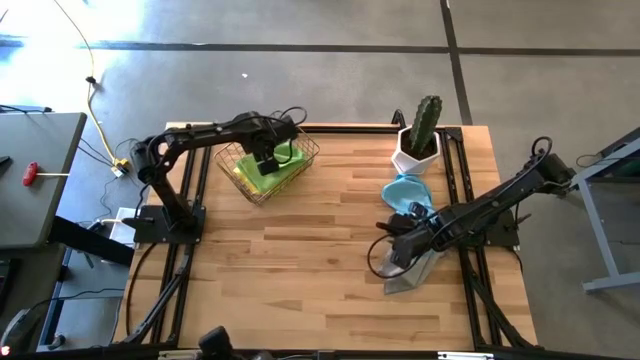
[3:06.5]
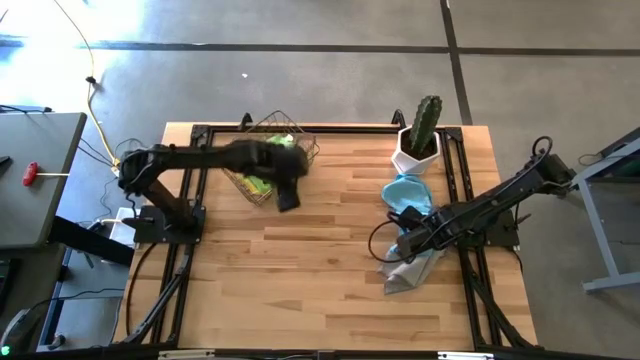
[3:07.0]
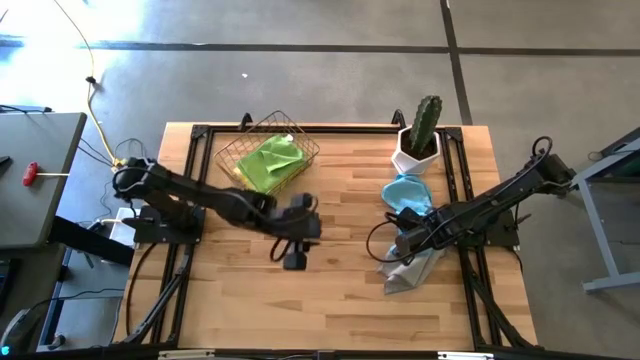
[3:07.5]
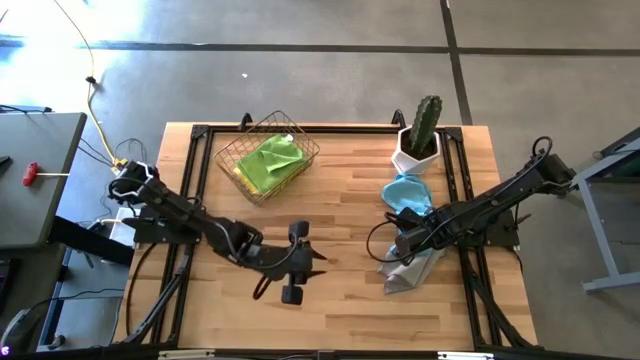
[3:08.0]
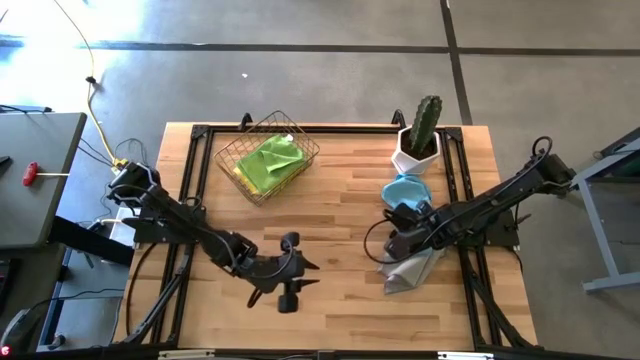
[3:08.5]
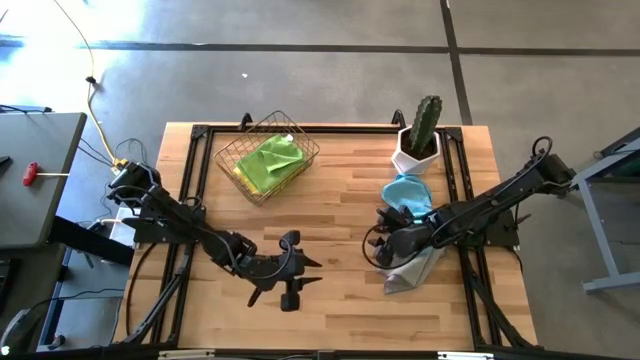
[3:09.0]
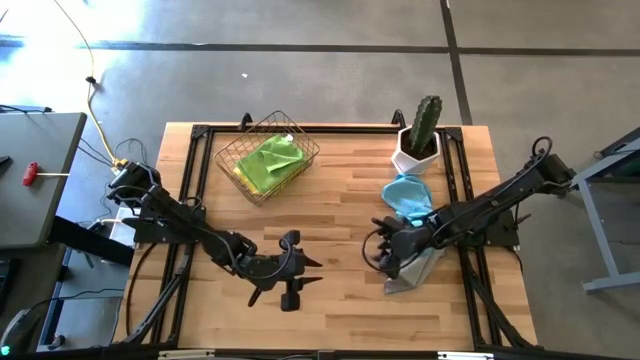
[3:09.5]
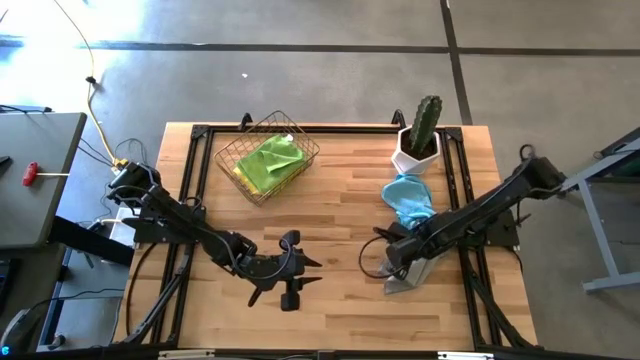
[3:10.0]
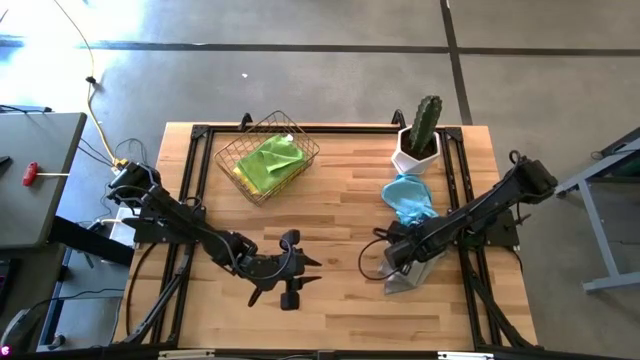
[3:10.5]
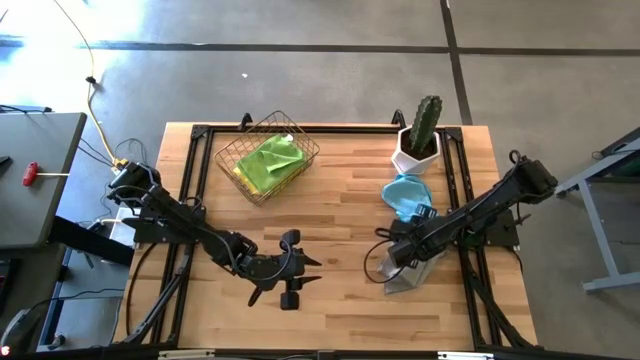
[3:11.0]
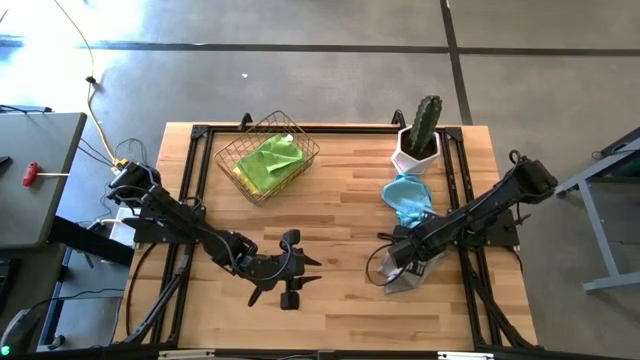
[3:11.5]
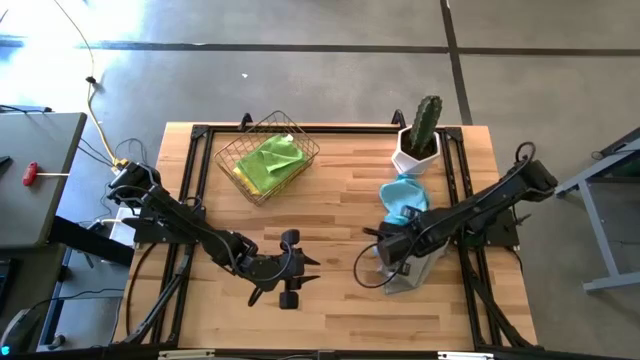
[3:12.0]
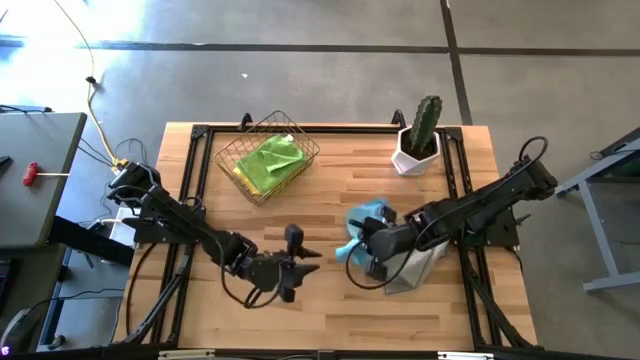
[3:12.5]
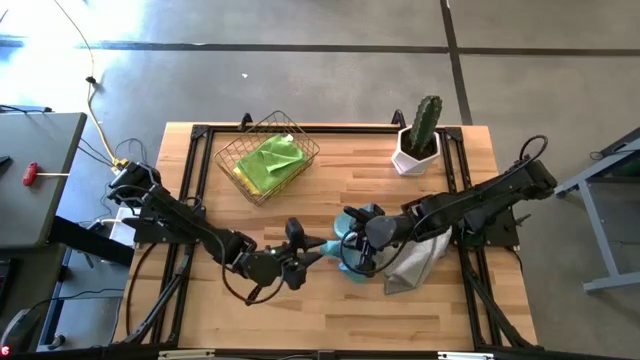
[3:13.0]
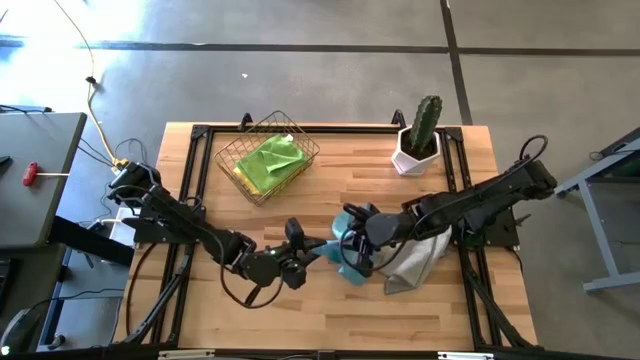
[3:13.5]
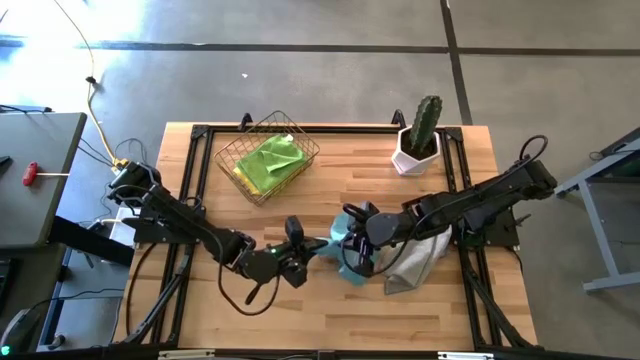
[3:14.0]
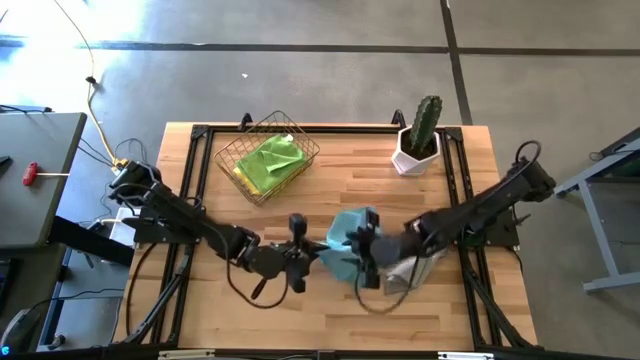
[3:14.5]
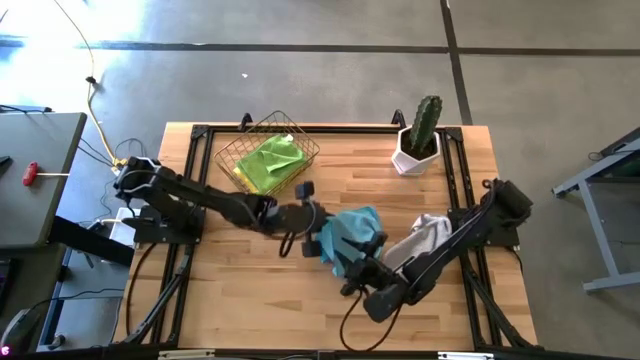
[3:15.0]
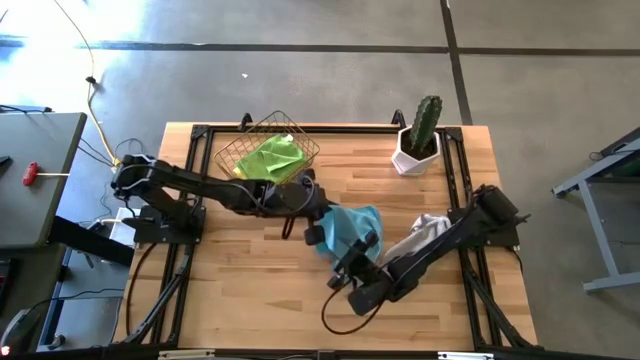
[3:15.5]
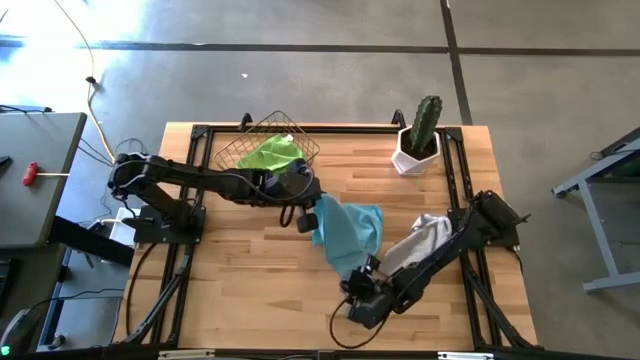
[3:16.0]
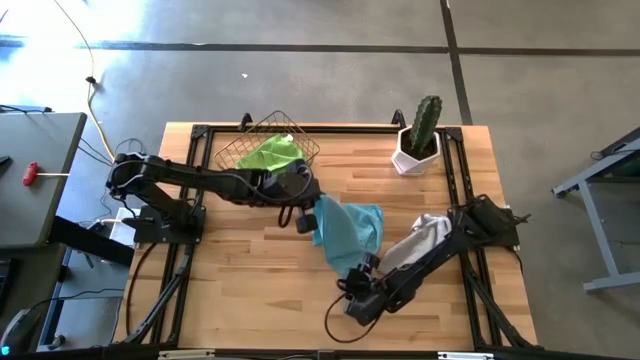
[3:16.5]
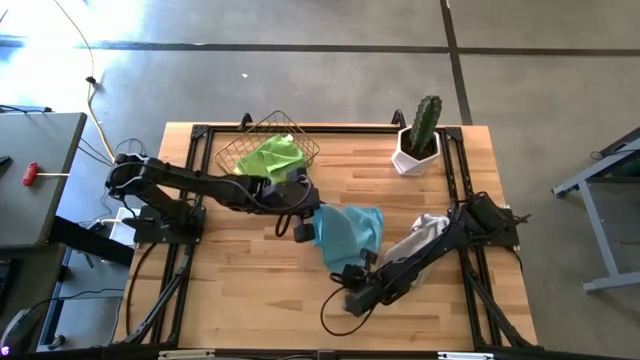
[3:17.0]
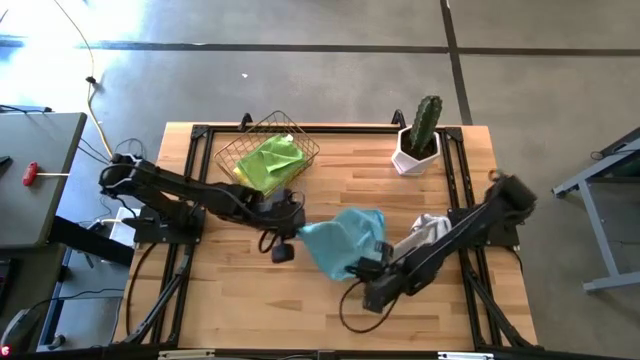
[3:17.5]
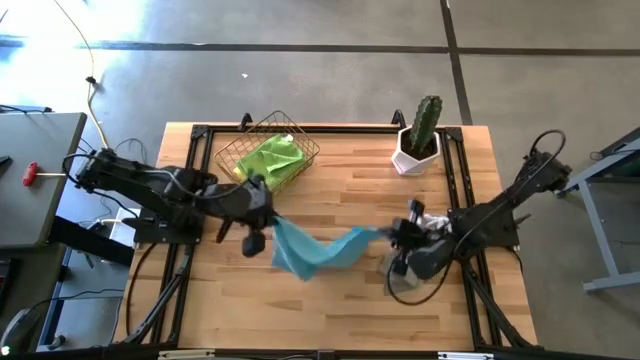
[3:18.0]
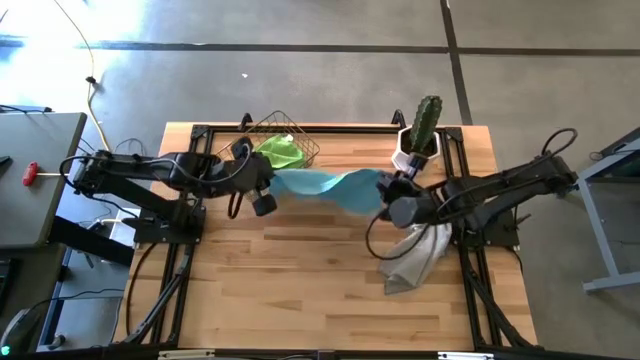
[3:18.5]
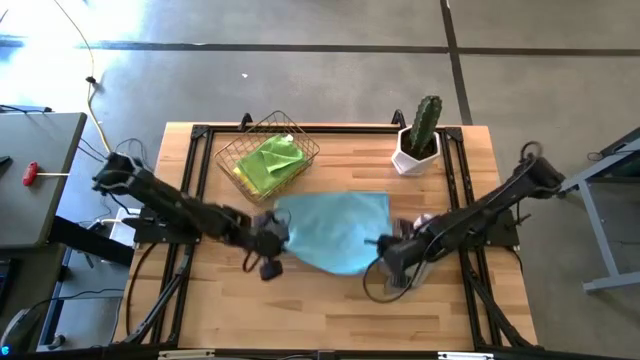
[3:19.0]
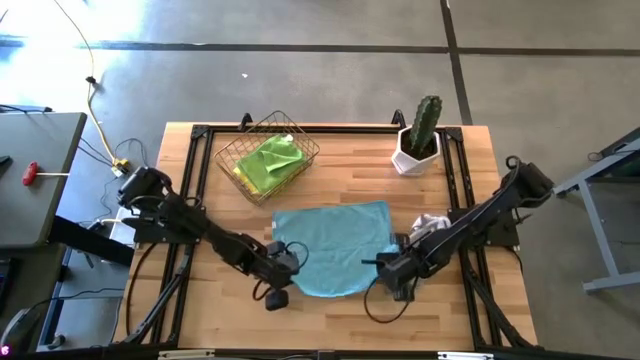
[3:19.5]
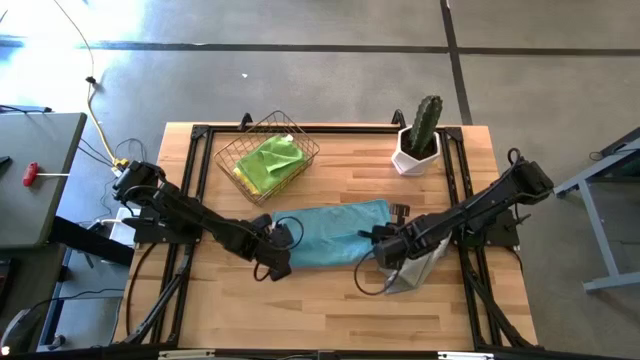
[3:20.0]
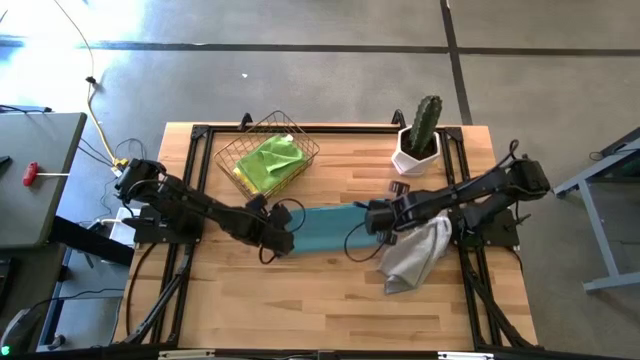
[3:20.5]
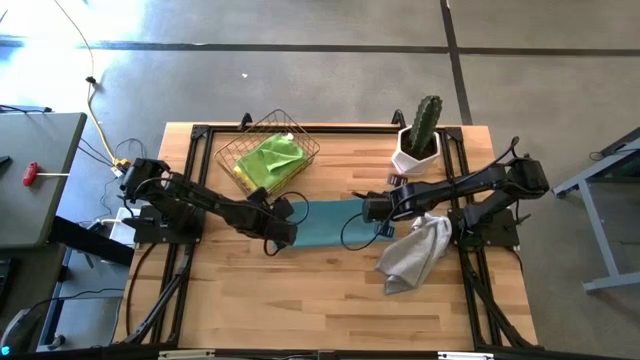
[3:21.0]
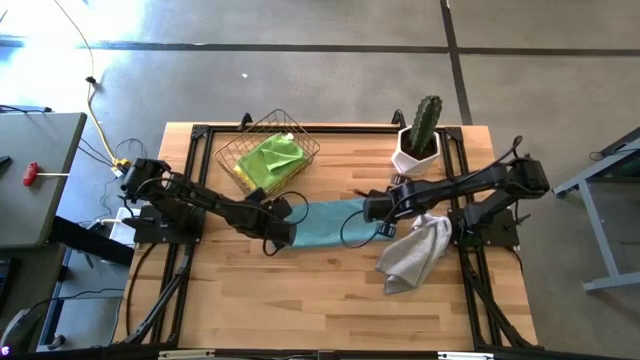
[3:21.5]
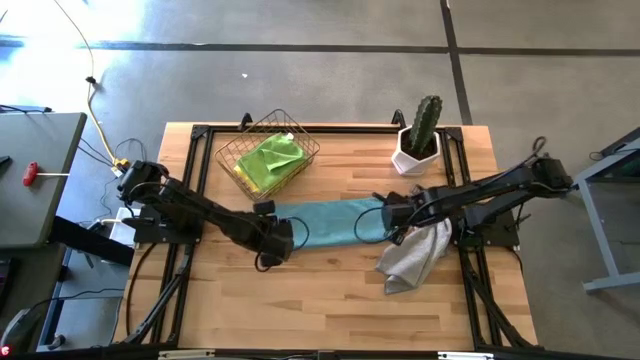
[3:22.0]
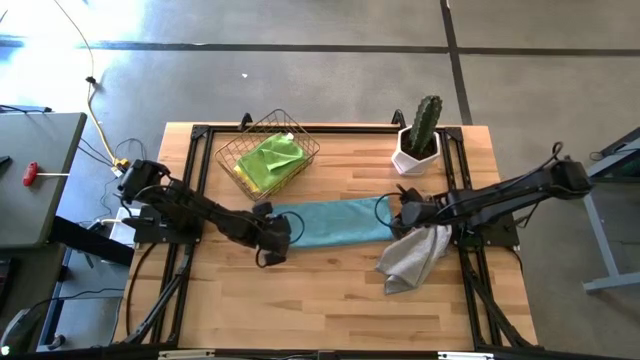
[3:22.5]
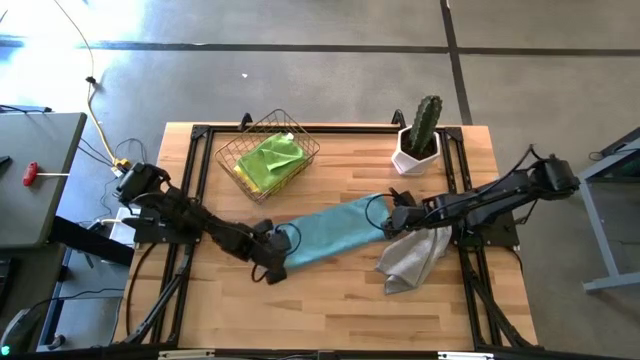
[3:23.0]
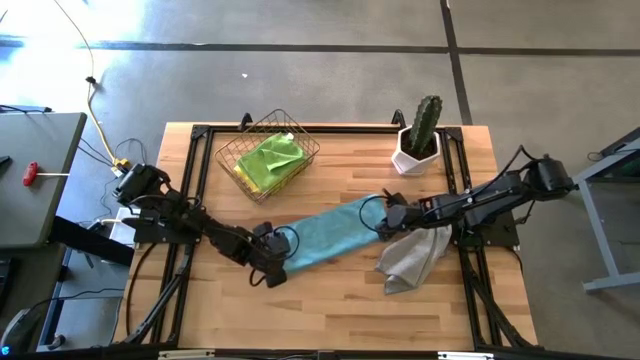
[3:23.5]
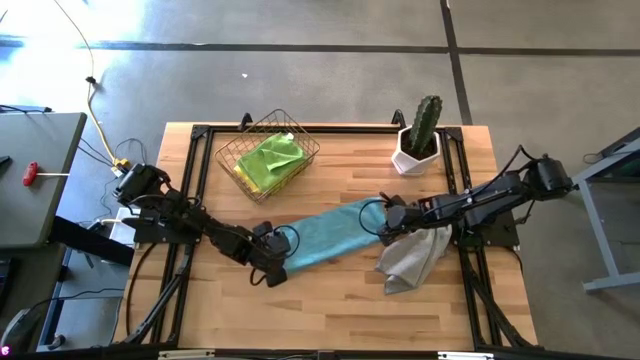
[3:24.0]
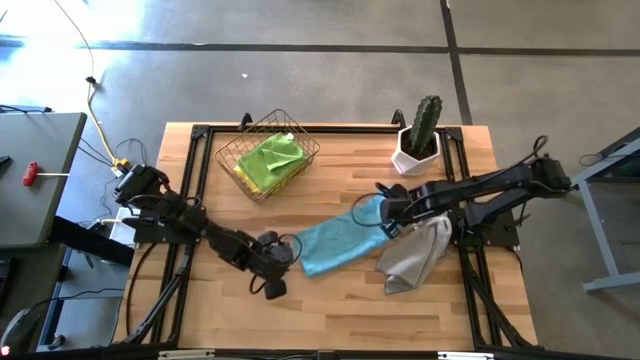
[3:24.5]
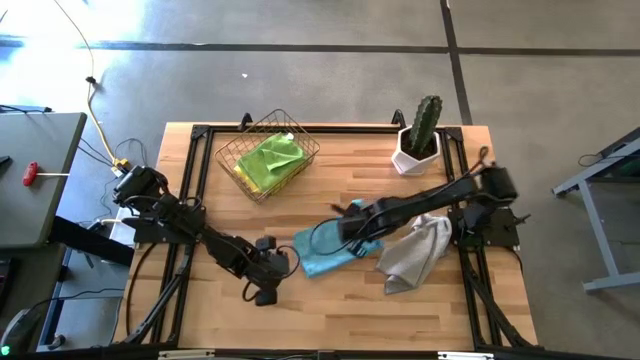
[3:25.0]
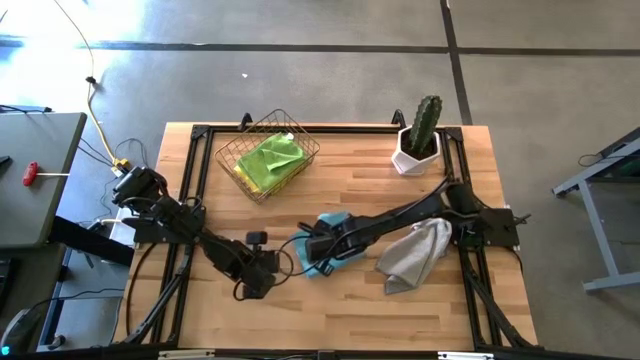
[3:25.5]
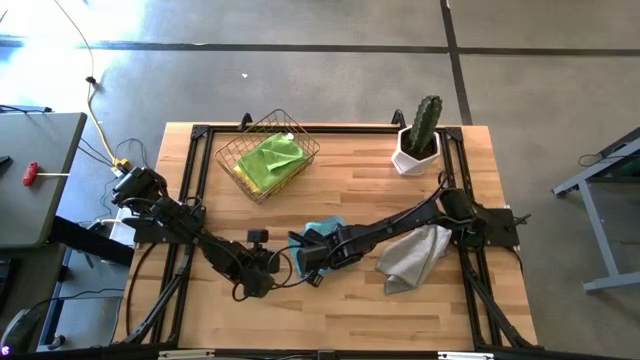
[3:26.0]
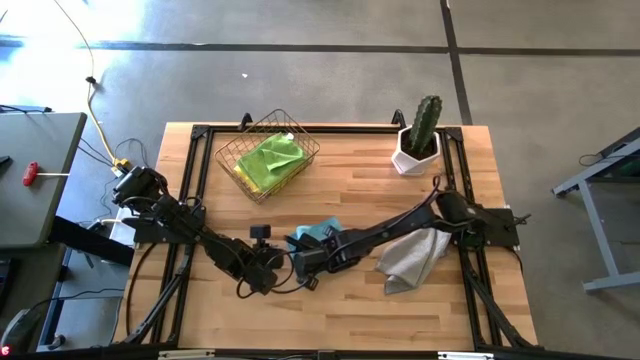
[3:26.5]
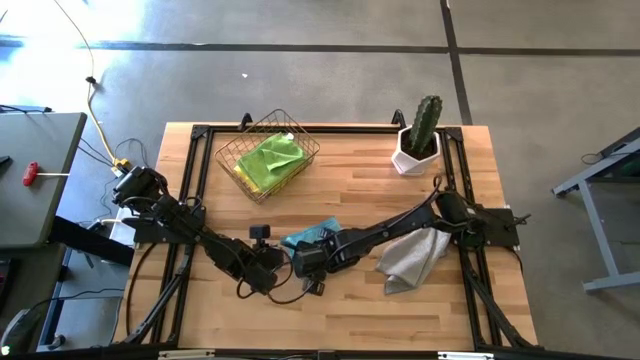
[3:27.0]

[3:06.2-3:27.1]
Task: Fold microfiber towels
Fold the light blue microfiber towel

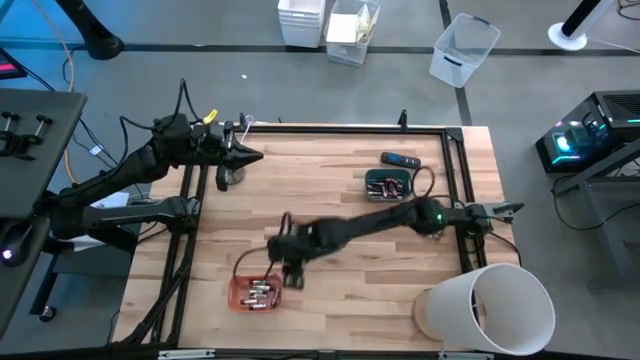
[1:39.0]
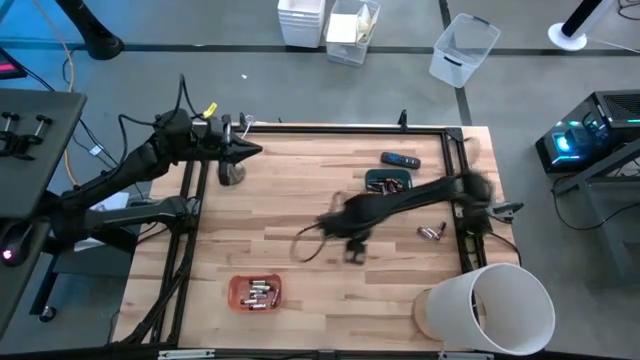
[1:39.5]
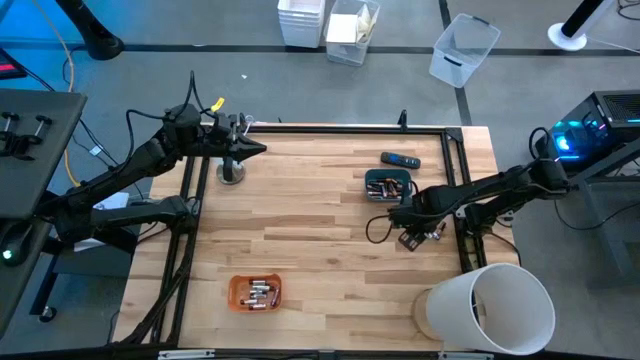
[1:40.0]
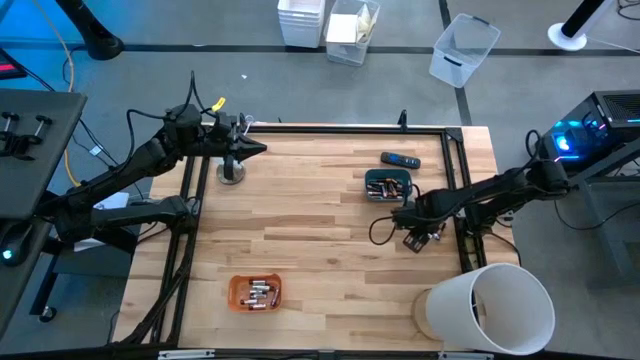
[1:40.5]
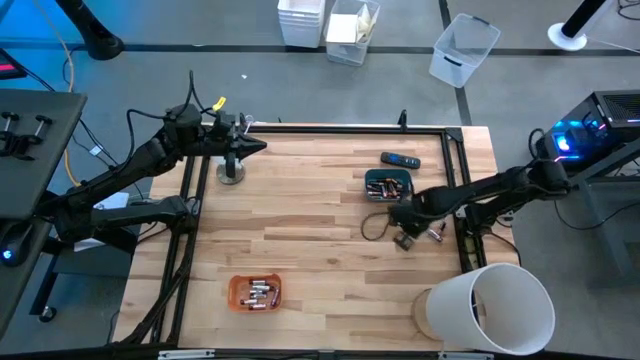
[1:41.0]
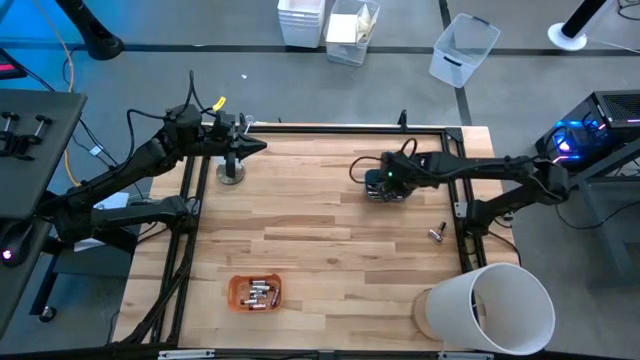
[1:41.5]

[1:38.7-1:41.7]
Task: Sort batteries
Put the silver battery into the orange bin
